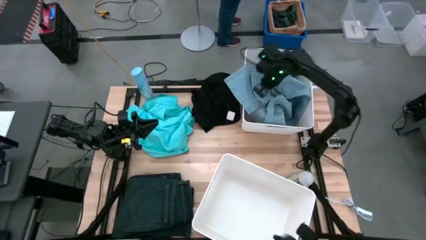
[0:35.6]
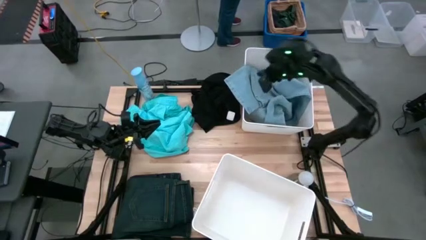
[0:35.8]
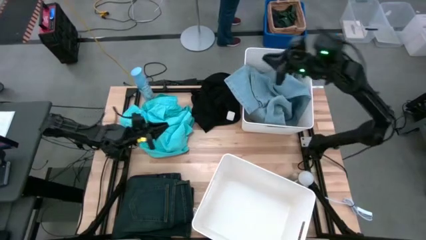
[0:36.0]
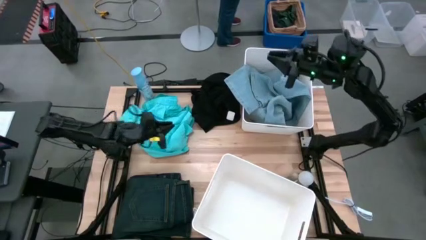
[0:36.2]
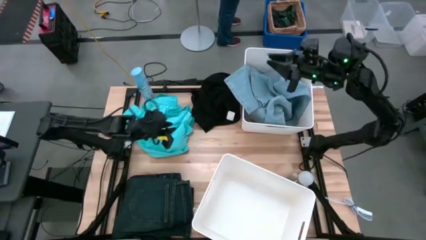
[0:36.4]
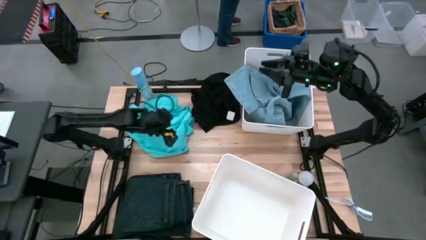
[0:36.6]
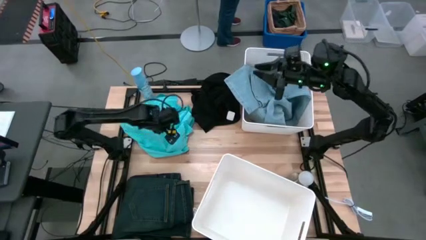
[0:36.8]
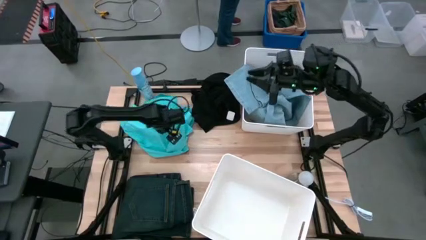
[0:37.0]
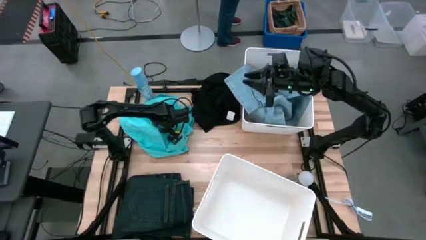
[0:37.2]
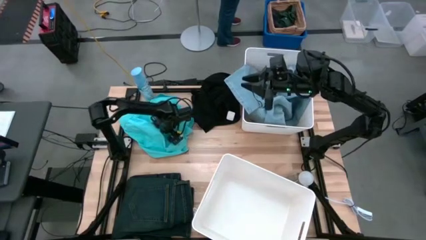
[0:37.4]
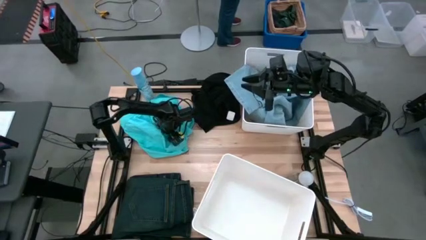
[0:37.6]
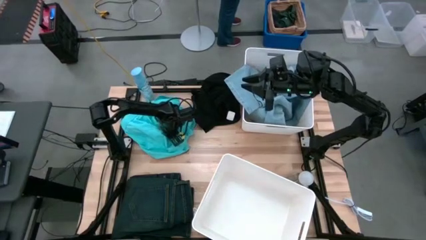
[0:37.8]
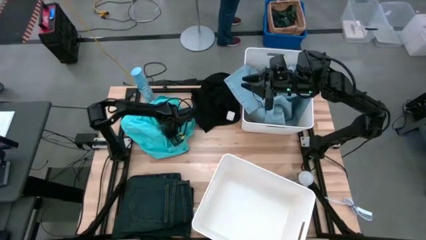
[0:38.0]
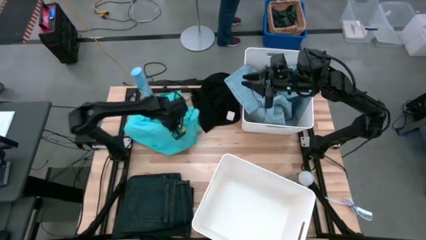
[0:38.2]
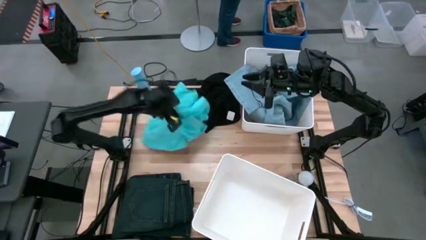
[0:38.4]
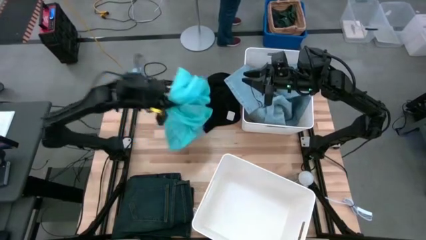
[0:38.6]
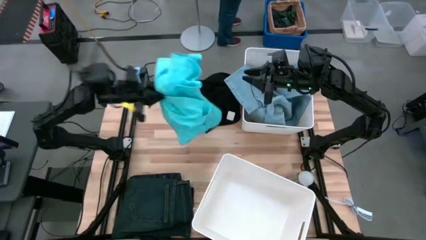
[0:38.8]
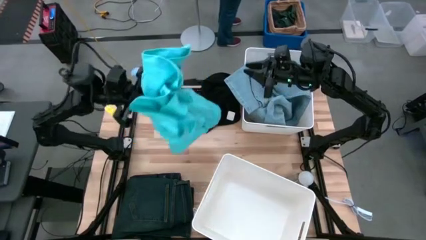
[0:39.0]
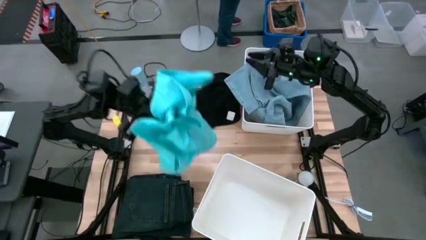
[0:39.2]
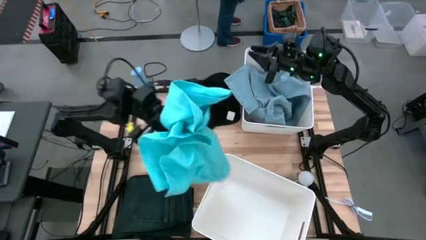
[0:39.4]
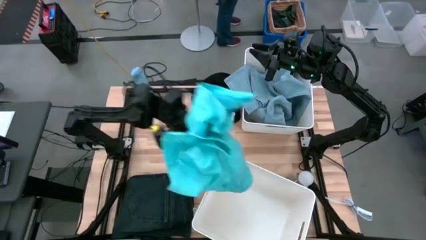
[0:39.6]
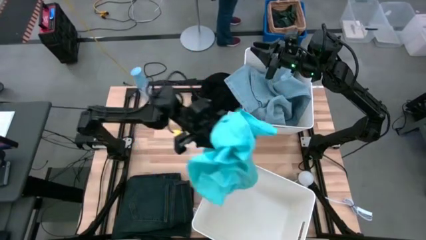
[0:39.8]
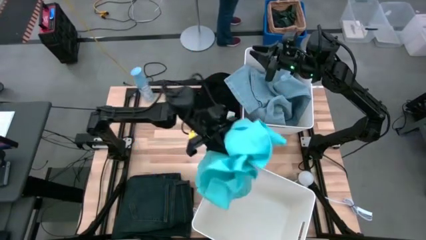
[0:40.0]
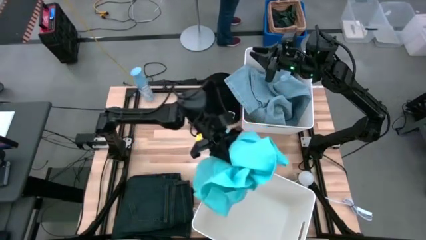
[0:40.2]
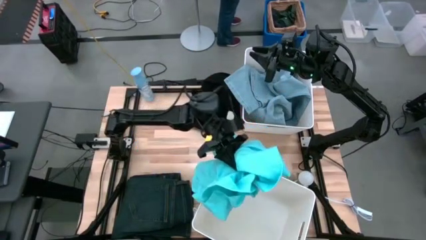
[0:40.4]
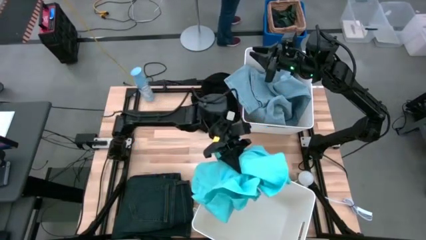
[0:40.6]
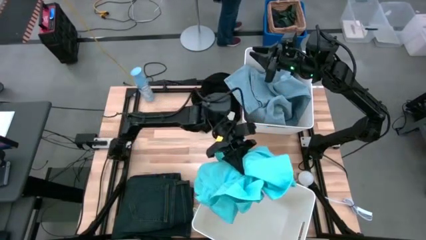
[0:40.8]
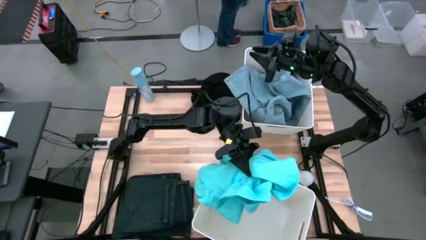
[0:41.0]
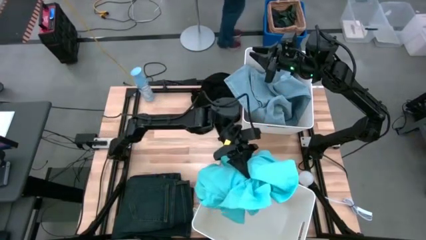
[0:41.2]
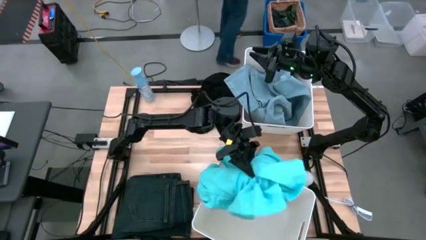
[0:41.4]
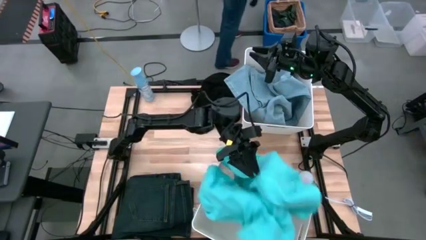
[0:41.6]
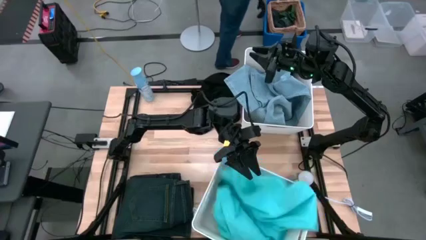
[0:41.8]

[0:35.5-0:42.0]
Task: Sort clothes
Put the blue shorts into the bottom white laundry bin

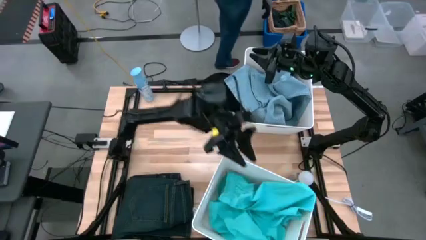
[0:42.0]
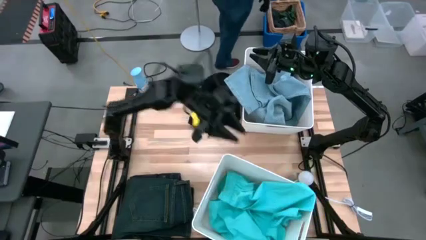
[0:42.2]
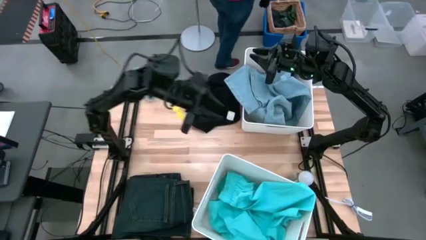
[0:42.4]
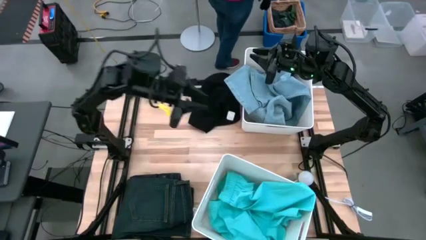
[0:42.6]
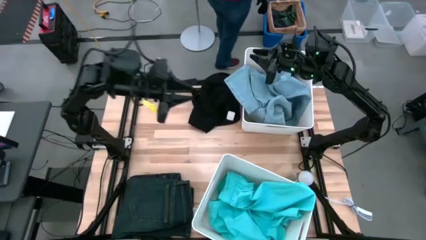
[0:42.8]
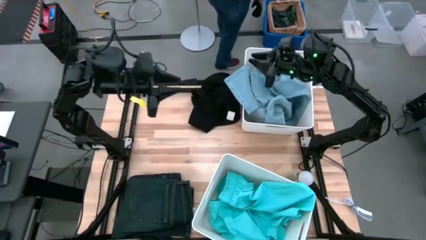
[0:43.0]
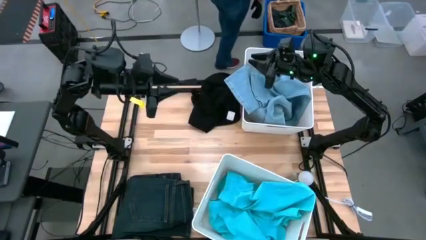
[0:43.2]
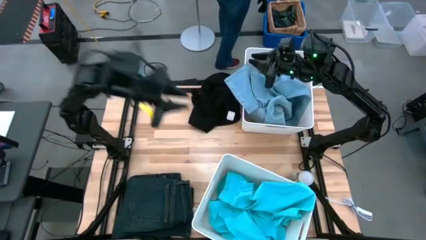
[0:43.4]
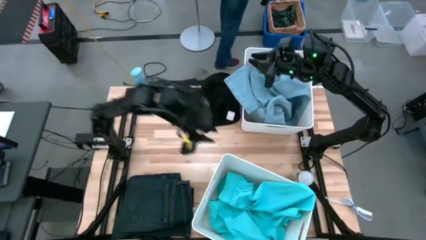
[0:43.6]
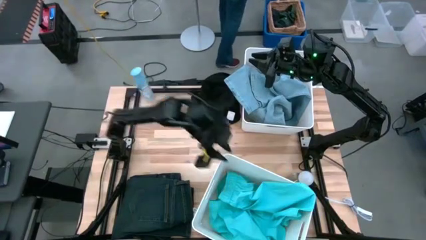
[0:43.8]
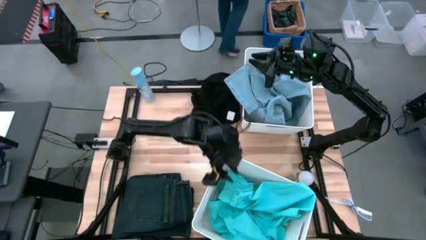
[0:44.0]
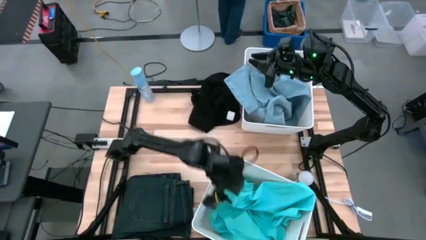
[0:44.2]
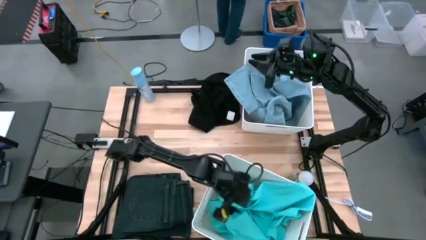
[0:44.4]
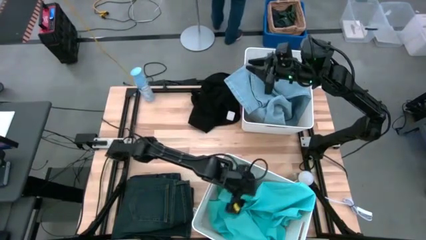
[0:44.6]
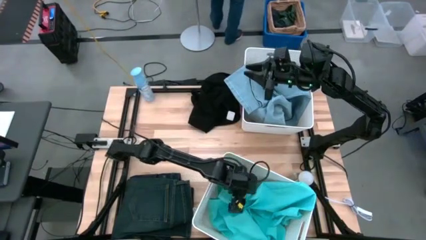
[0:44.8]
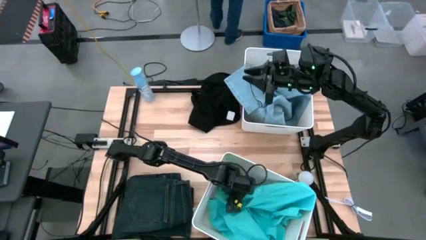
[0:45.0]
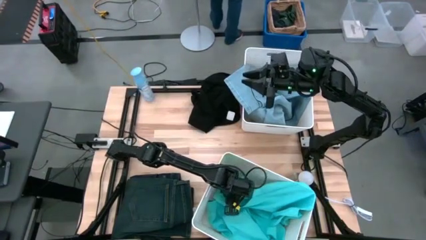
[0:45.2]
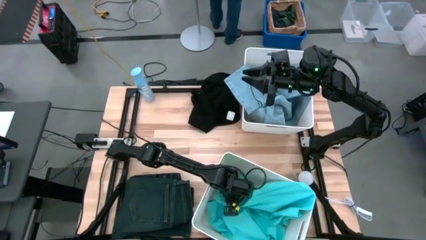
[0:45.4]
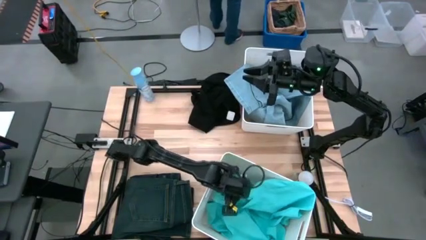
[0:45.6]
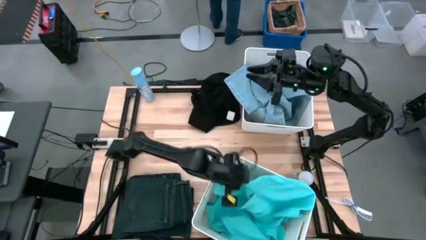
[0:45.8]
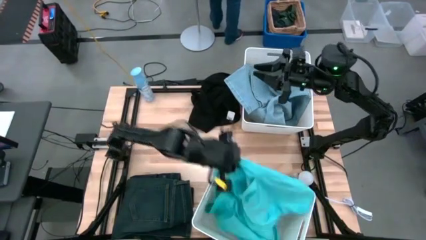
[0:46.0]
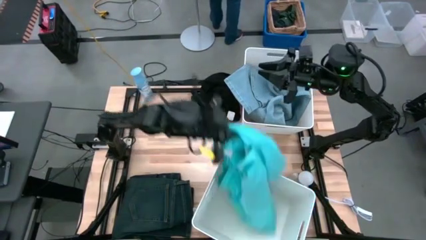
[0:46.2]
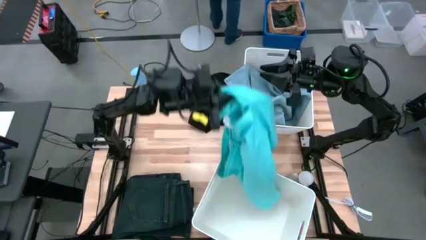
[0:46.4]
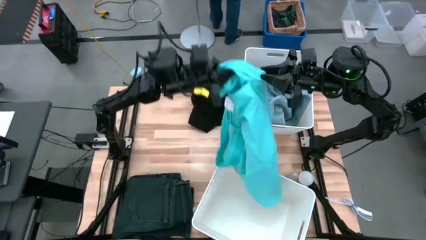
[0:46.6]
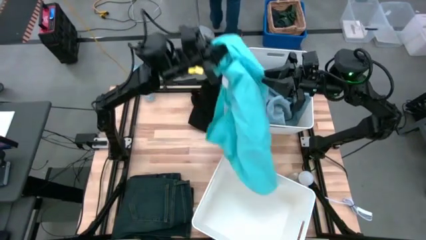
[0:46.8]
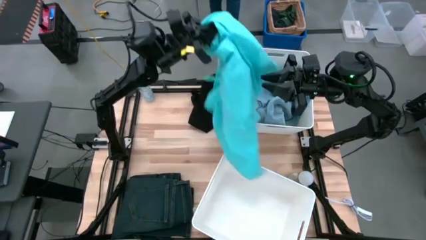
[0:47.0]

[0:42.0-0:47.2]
Remove the blue shorts from the bottom white laundry bin
